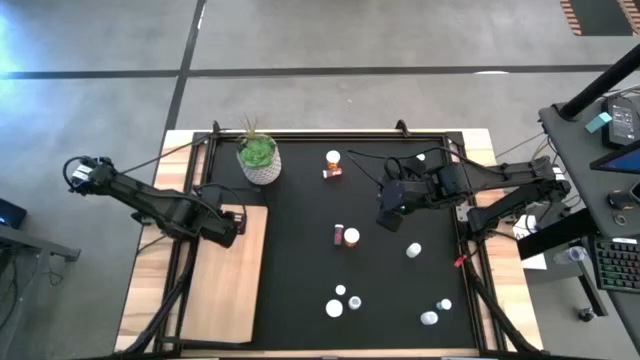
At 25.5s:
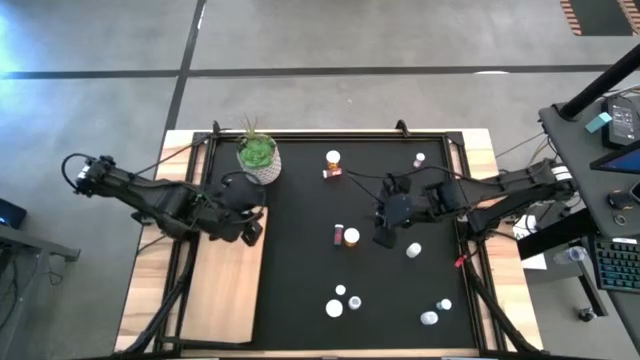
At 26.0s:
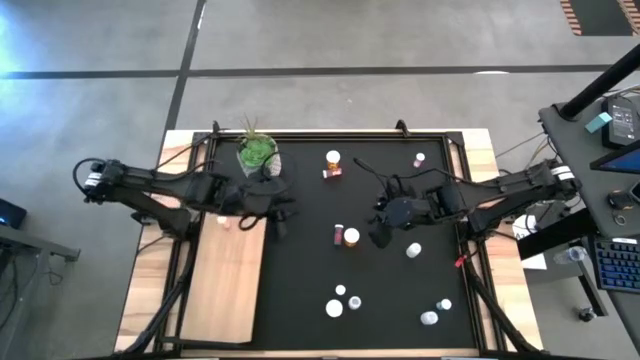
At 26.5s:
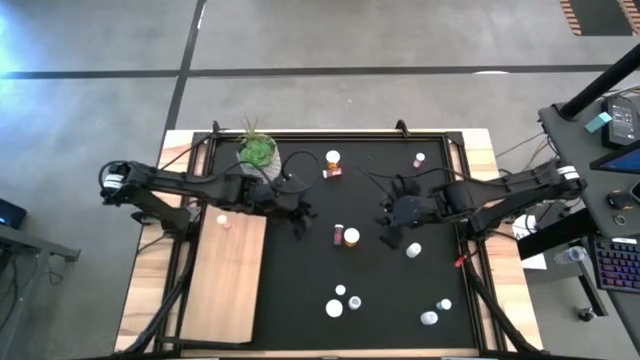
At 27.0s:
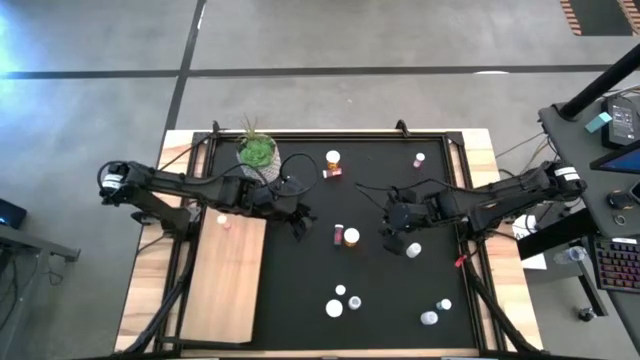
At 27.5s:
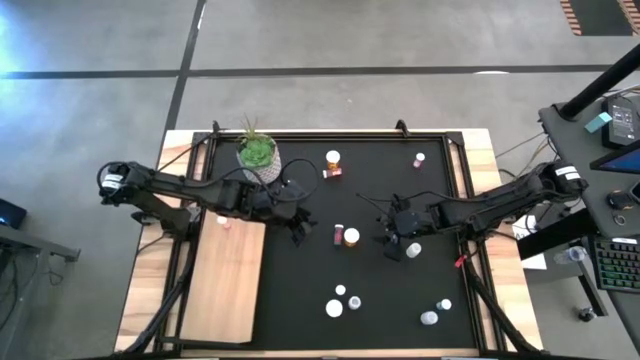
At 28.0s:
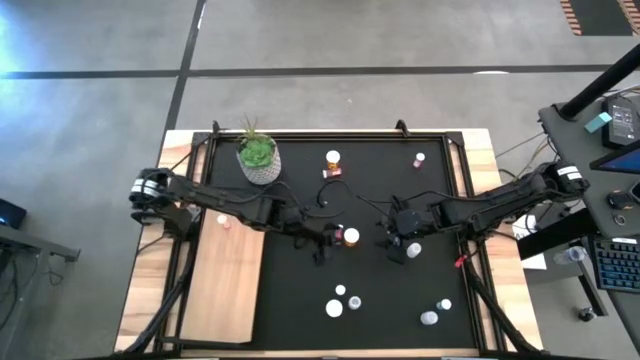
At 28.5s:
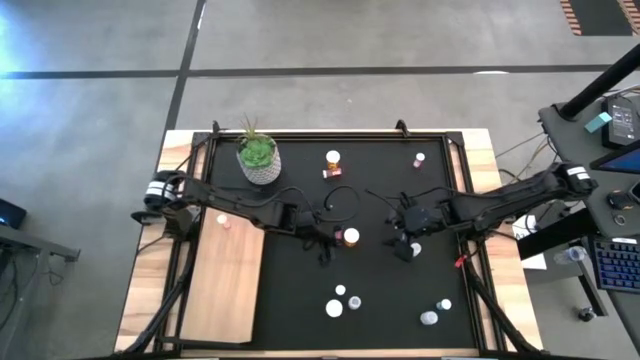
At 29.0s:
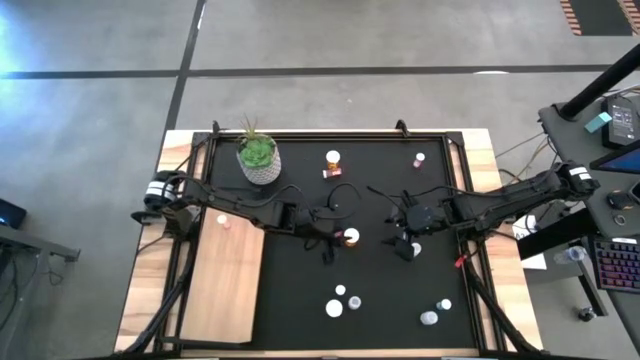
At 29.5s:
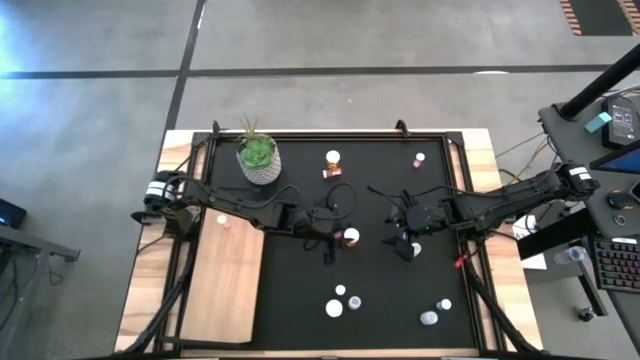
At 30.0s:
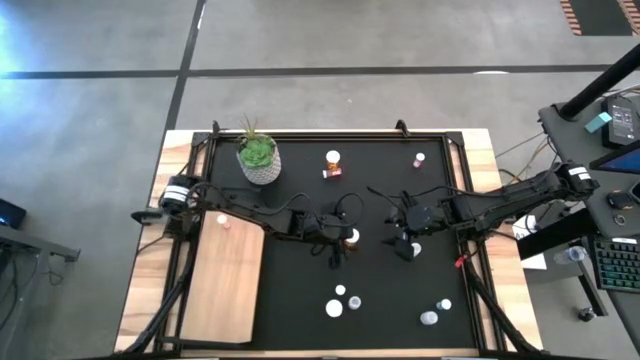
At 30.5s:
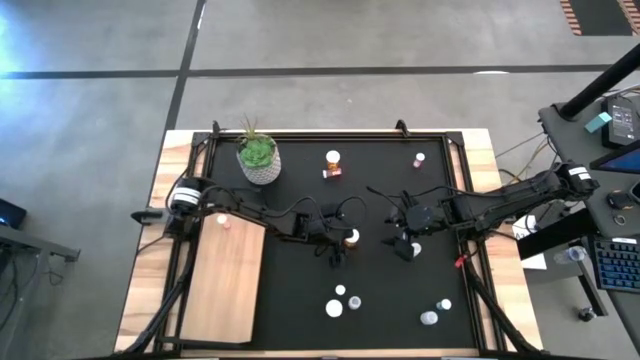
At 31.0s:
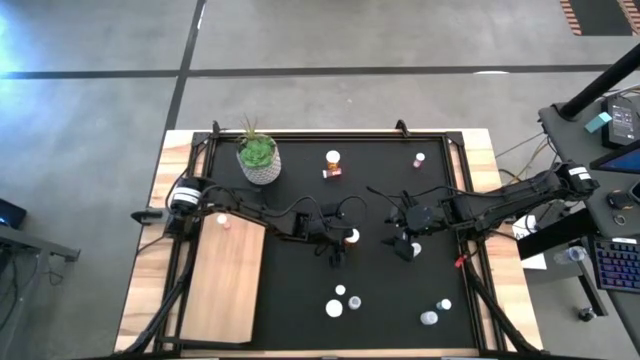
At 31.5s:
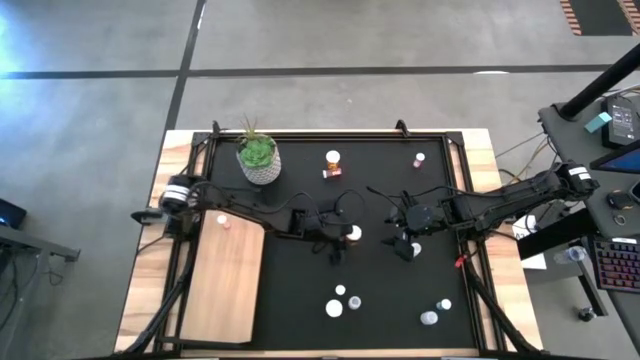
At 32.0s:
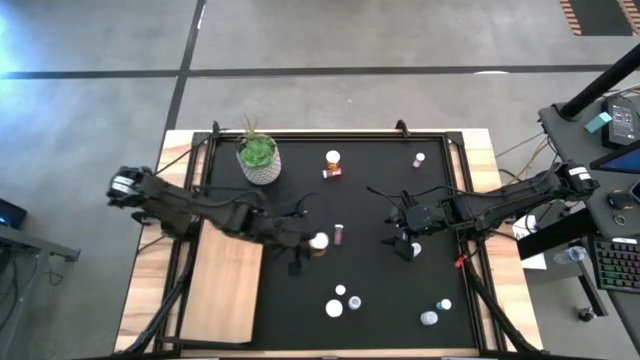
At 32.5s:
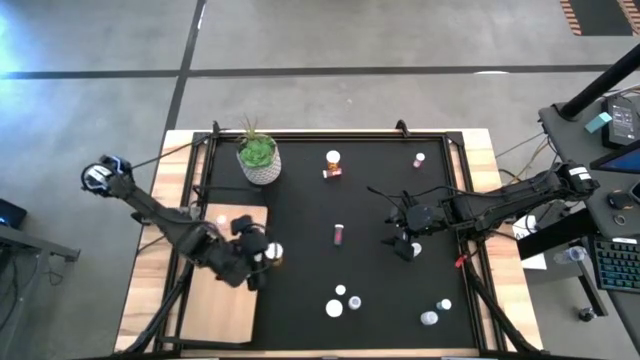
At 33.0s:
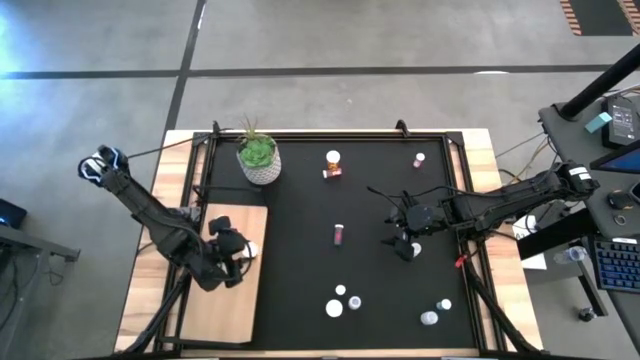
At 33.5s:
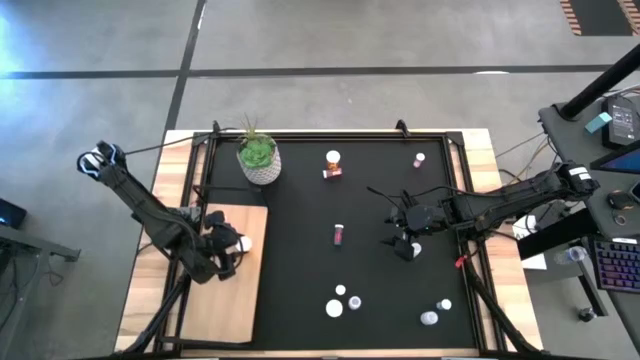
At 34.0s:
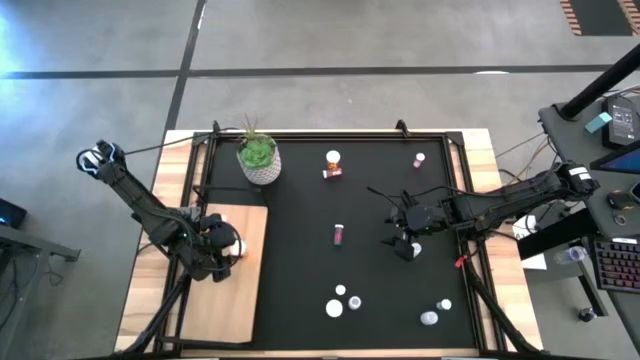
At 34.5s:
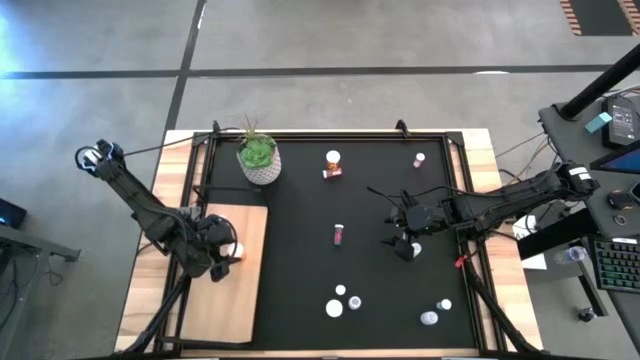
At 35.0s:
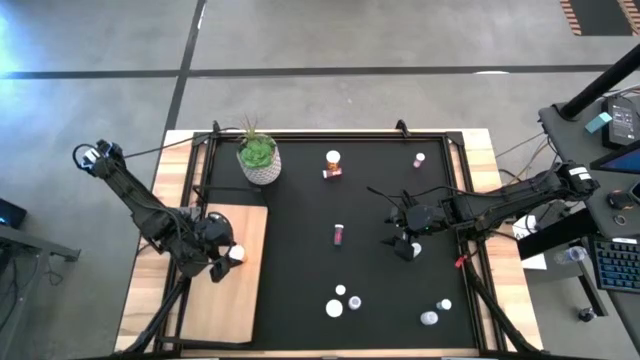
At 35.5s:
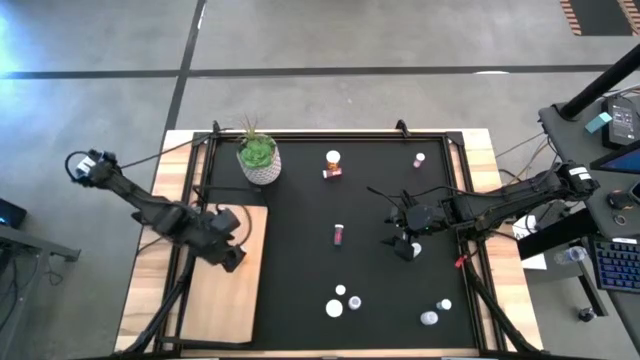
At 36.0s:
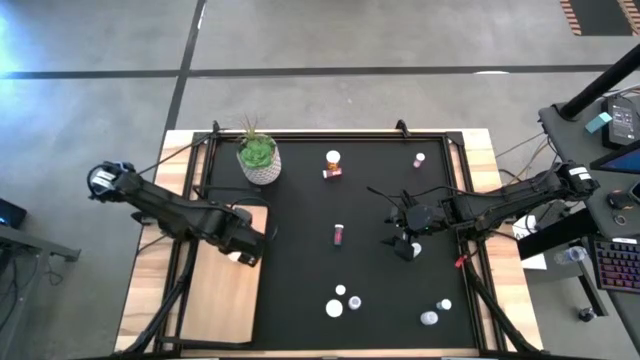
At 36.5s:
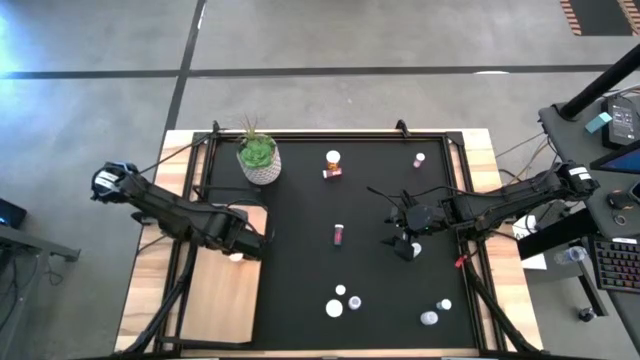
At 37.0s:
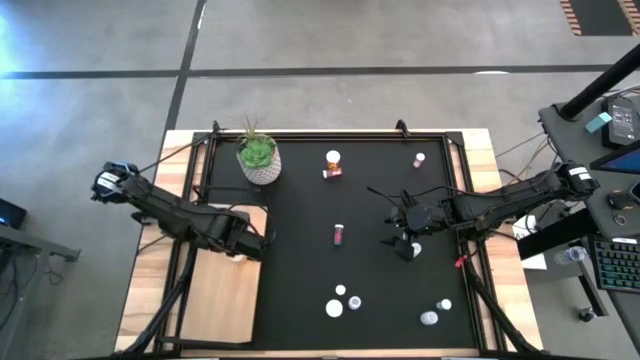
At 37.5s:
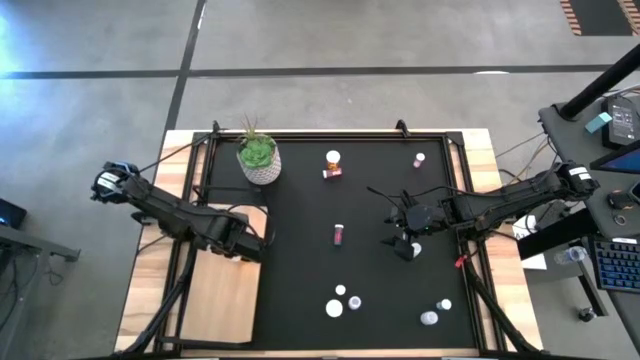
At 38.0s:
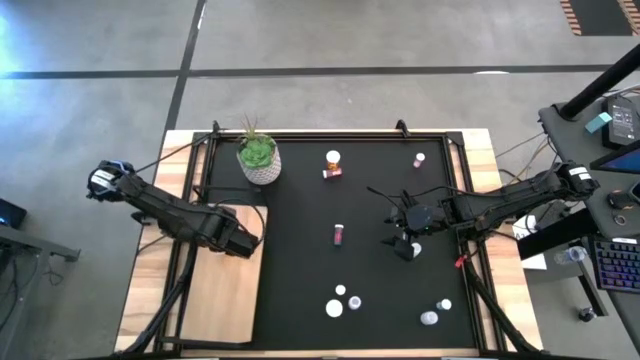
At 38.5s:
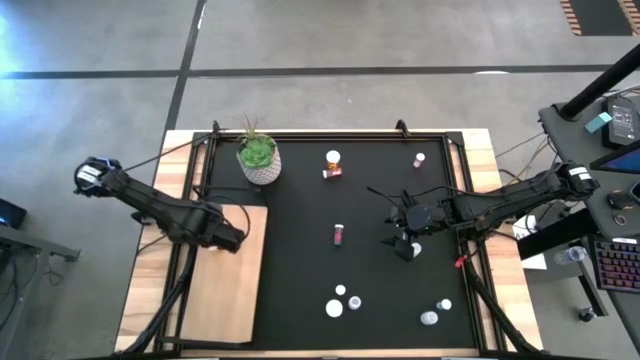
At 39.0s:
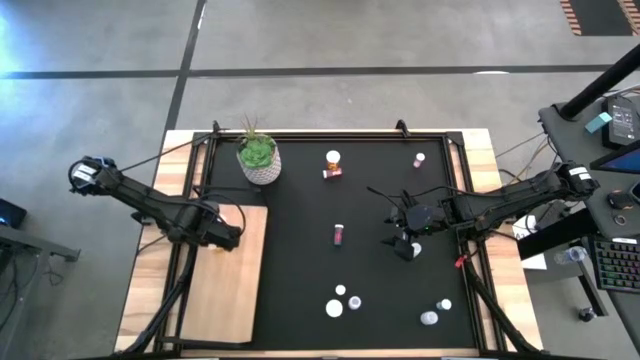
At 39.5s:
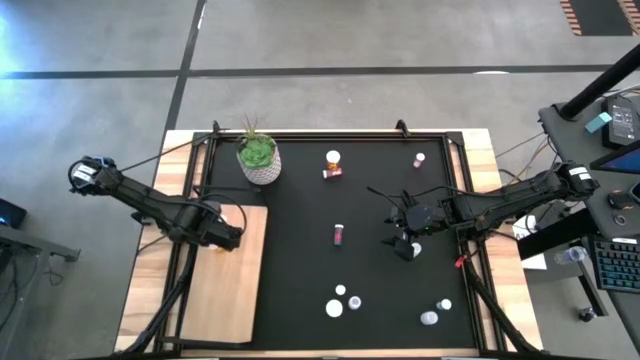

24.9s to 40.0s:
Task: Pick and place medicine bottles onto shelf by color
Put the center orange pill bottle on the shelf

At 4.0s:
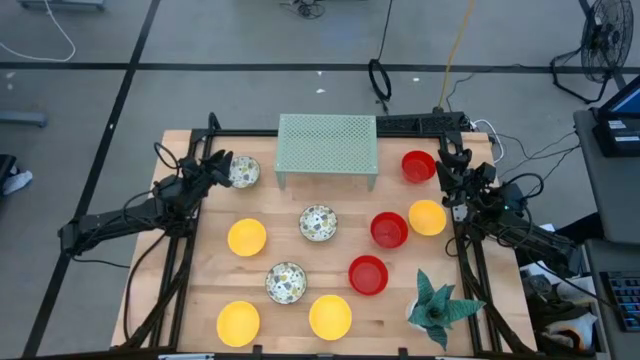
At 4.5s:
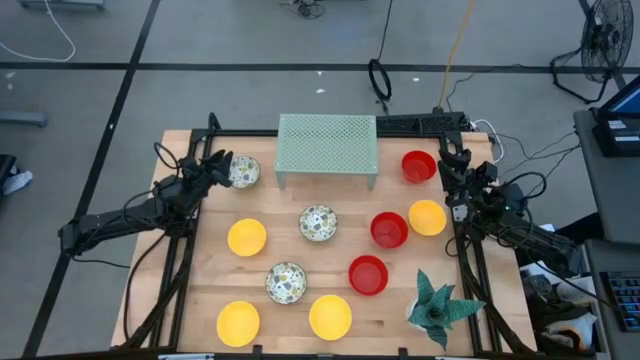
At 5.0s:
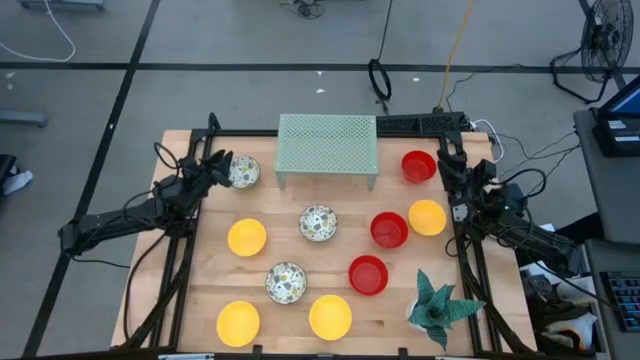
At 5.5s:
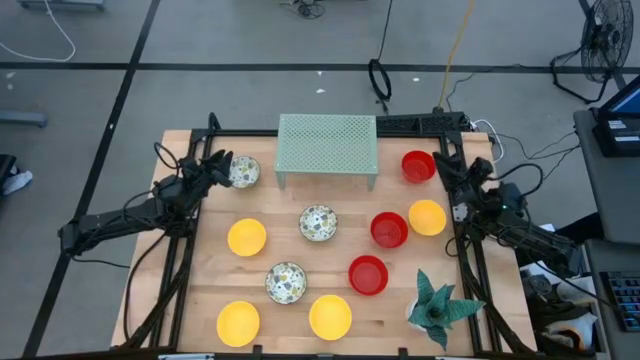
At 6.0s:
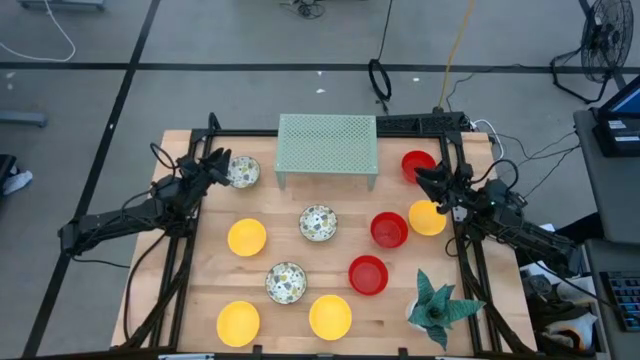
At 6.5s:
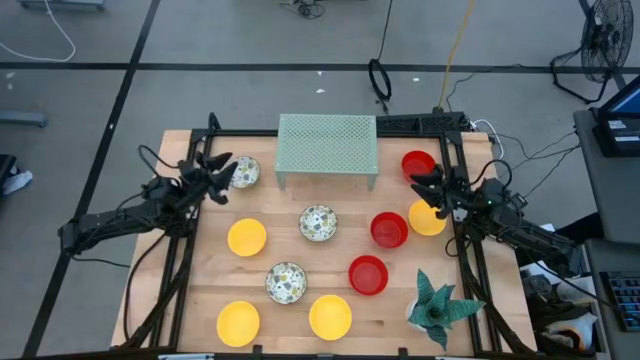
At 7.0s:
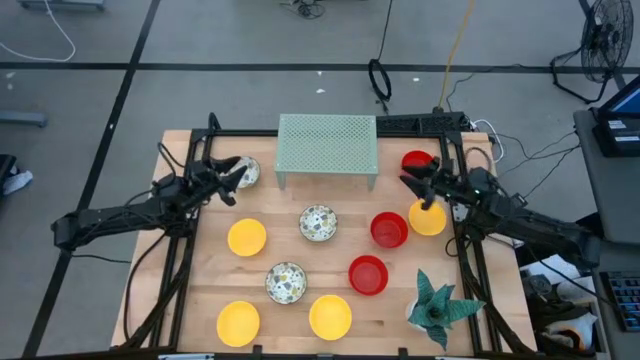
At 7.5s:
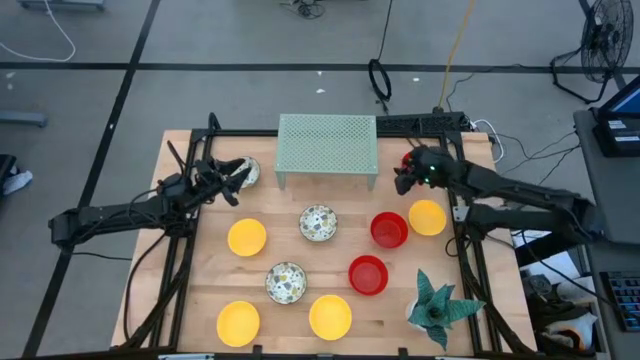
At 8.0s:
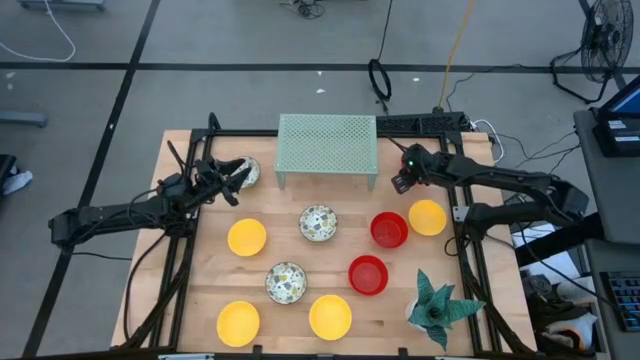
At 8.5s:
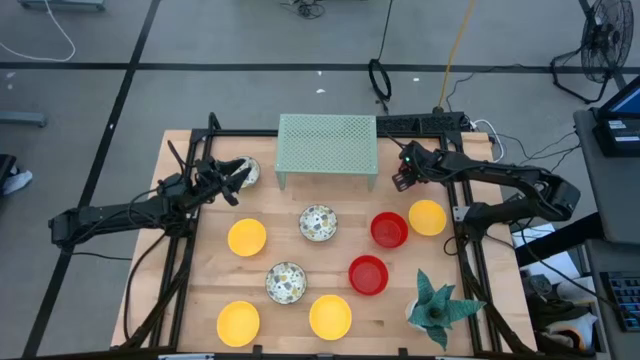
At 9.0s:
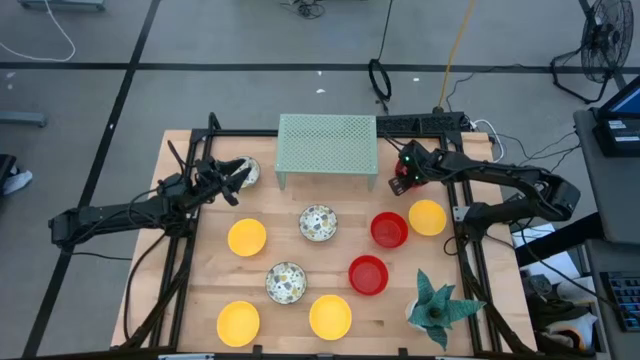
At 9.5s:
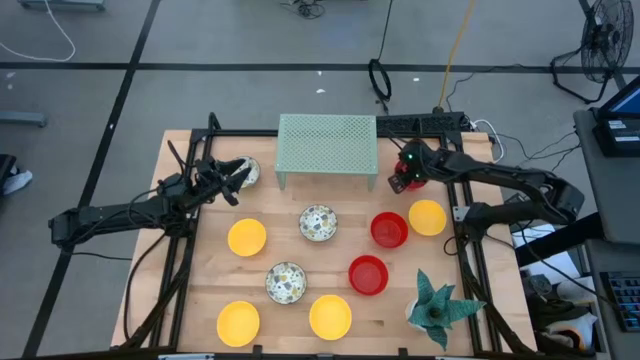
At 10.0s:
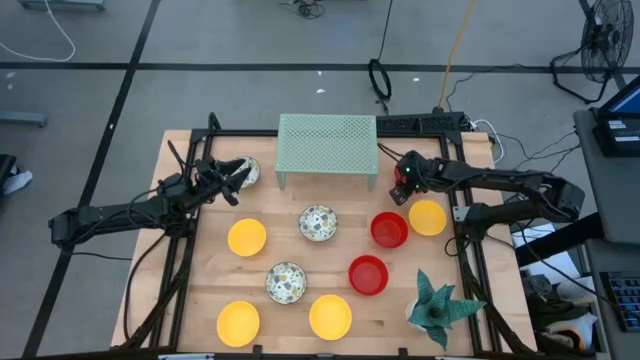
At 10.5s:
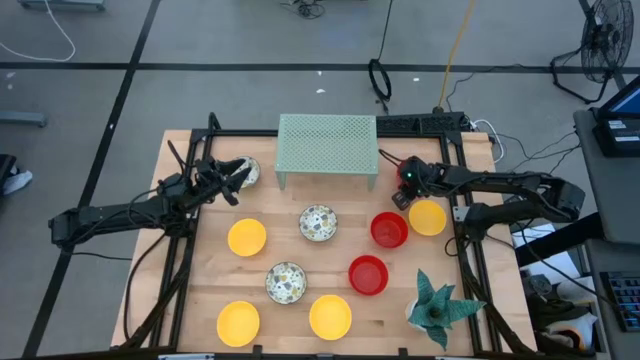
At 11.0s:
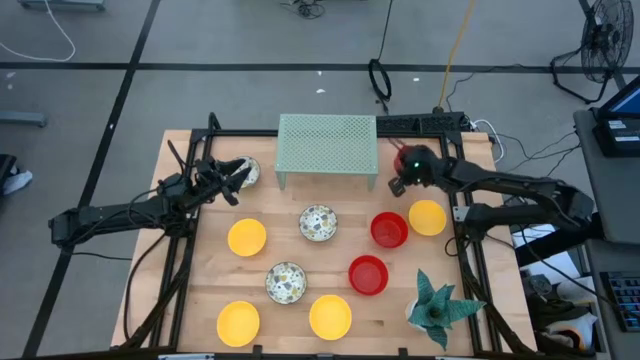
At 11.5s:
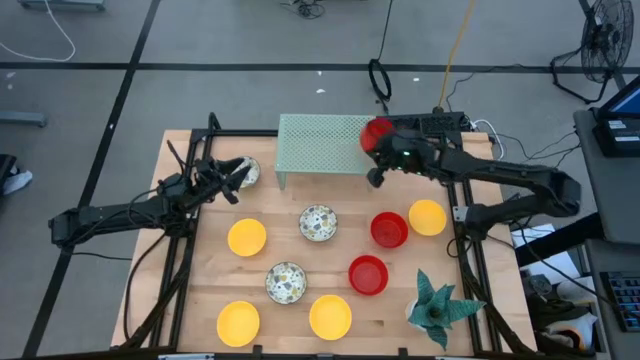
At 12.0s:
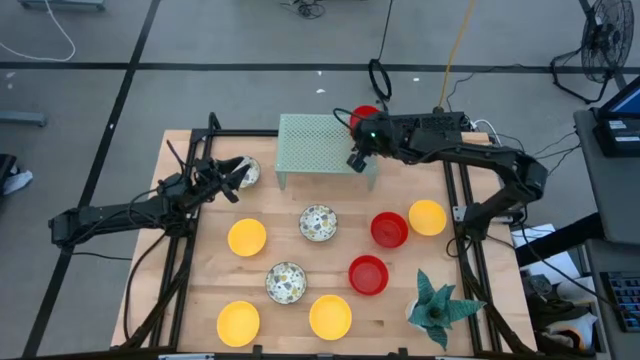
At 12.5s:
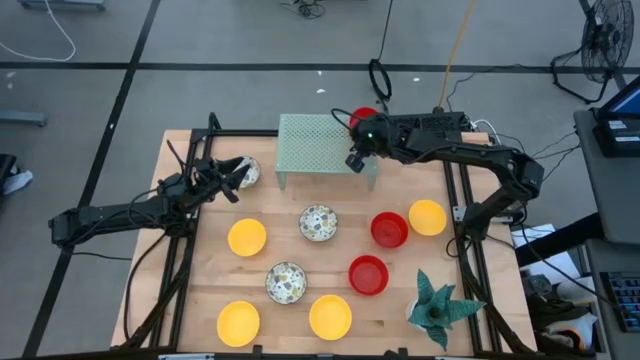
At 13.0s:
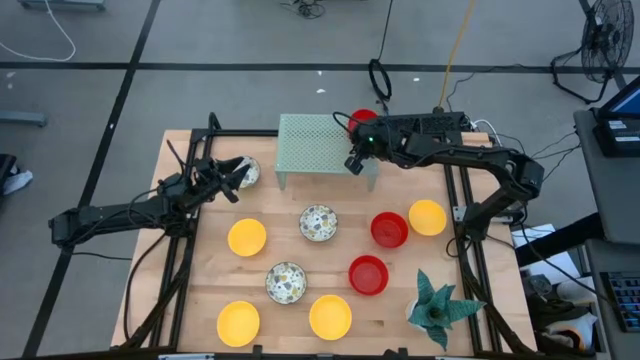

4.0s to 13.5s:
Task: Pick & Place Mini bowls
Put the red bowl on the shelf
